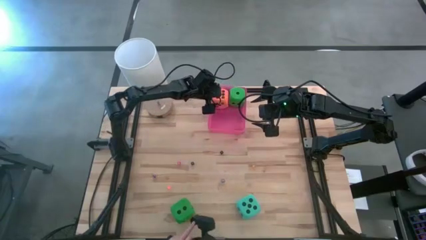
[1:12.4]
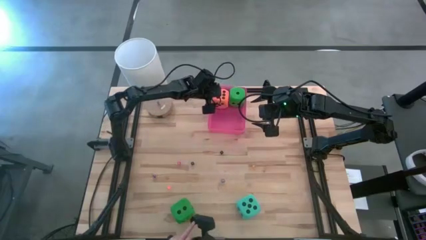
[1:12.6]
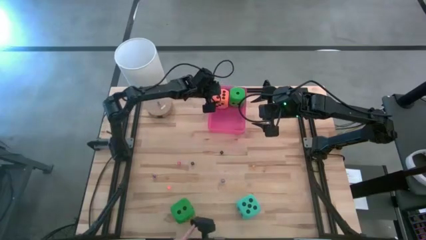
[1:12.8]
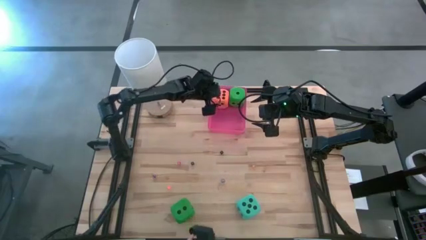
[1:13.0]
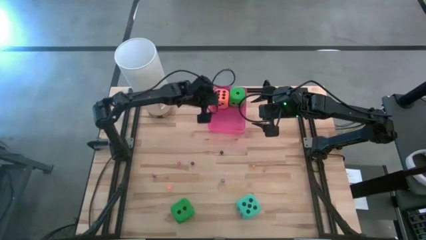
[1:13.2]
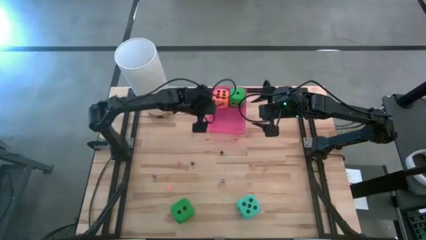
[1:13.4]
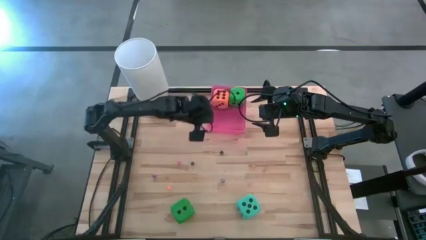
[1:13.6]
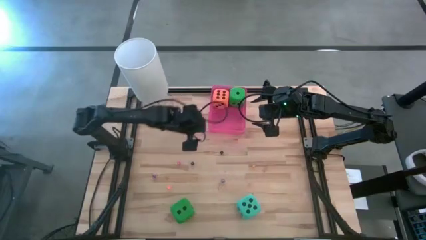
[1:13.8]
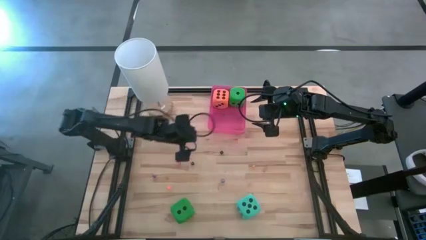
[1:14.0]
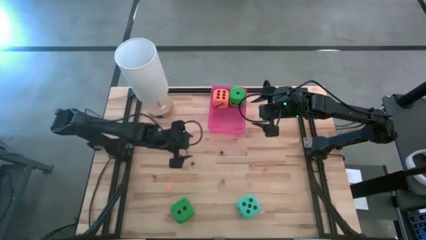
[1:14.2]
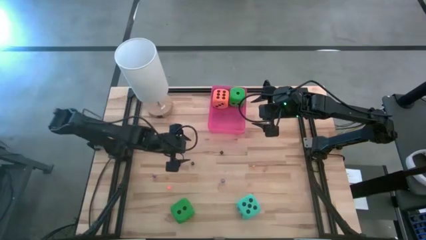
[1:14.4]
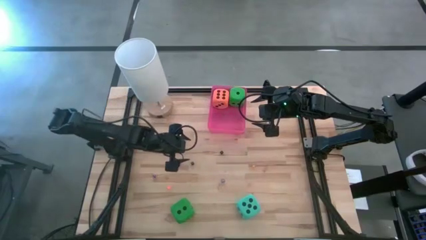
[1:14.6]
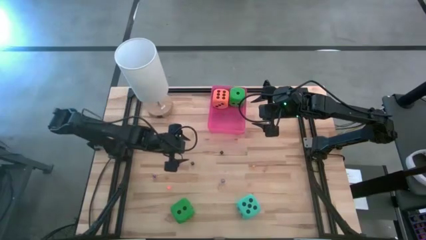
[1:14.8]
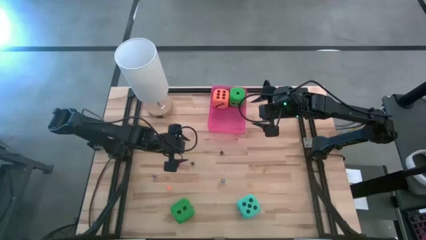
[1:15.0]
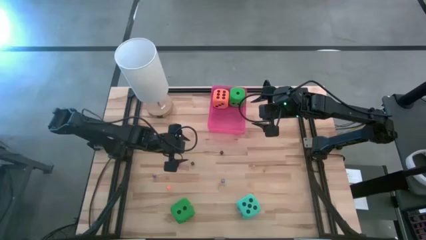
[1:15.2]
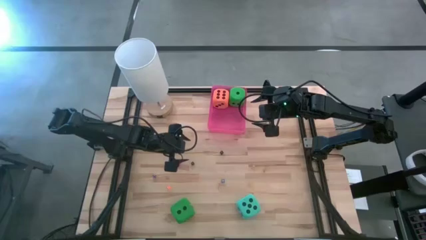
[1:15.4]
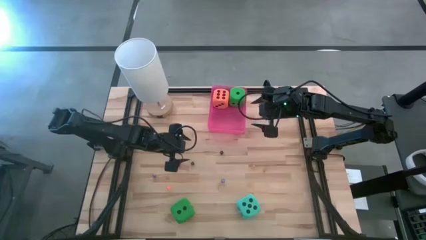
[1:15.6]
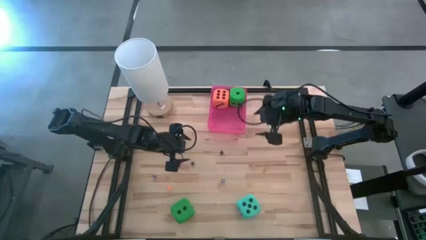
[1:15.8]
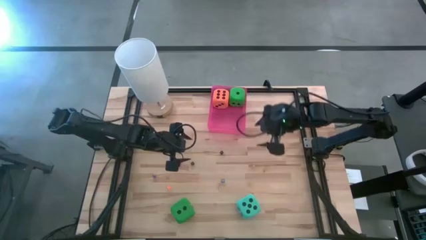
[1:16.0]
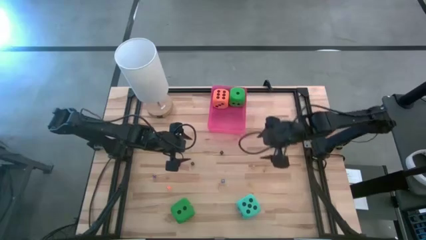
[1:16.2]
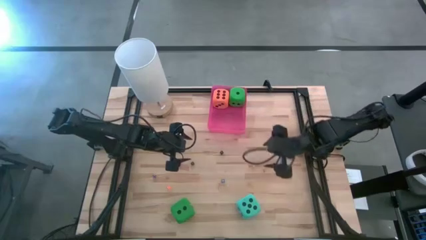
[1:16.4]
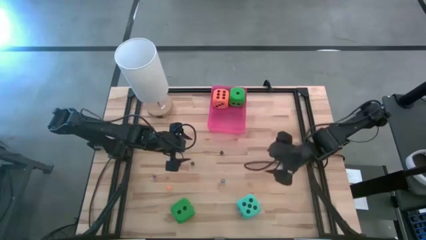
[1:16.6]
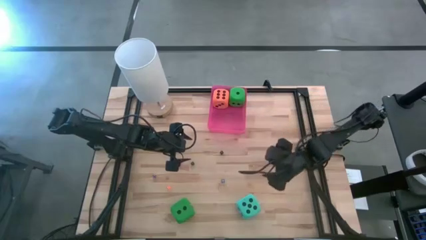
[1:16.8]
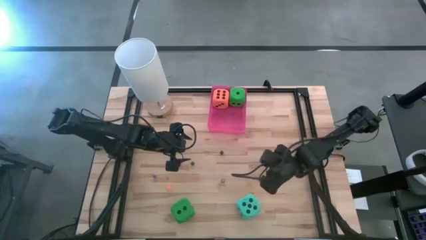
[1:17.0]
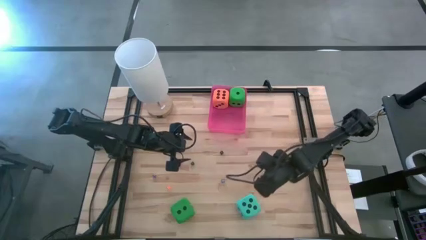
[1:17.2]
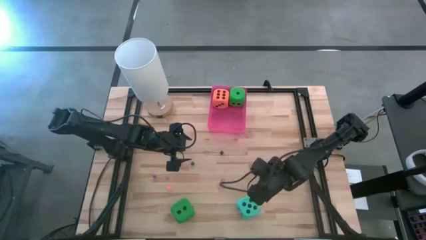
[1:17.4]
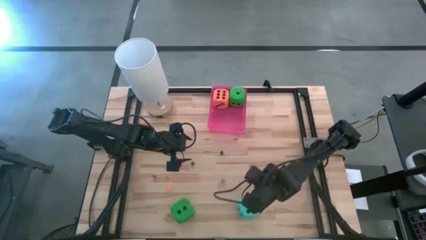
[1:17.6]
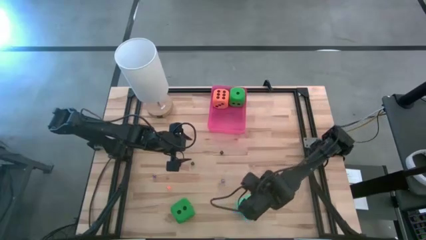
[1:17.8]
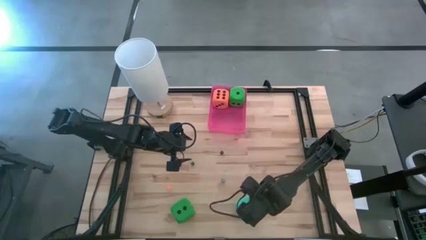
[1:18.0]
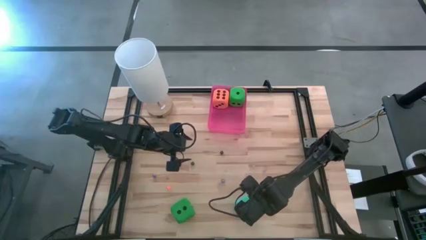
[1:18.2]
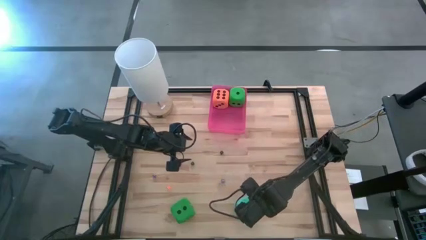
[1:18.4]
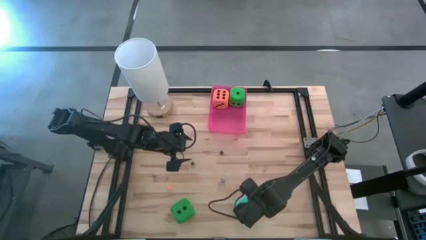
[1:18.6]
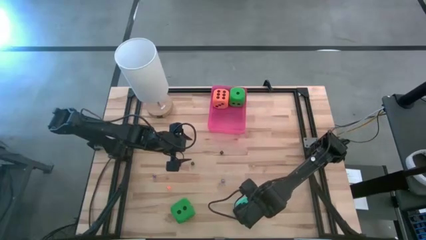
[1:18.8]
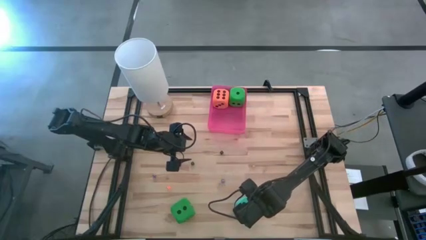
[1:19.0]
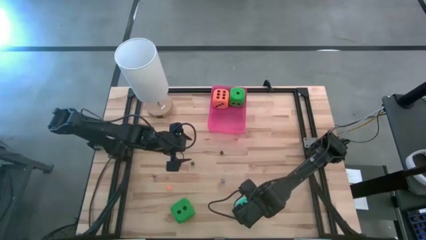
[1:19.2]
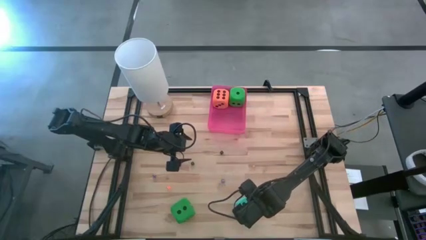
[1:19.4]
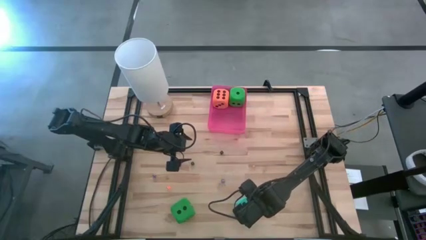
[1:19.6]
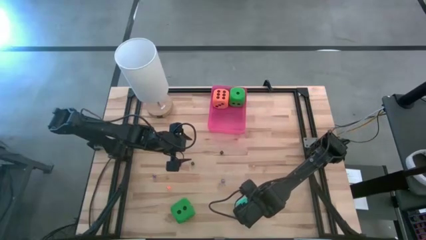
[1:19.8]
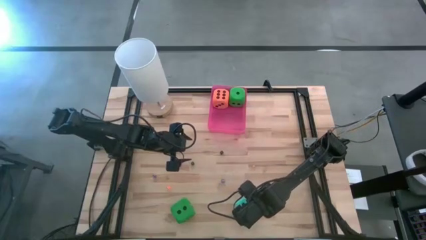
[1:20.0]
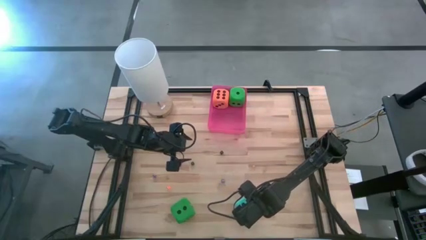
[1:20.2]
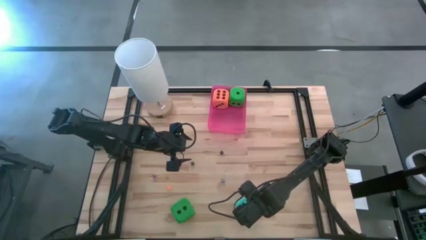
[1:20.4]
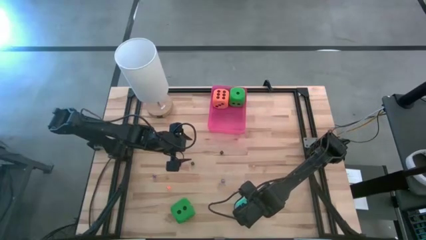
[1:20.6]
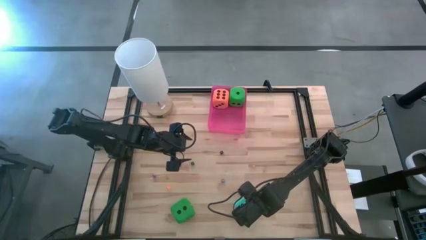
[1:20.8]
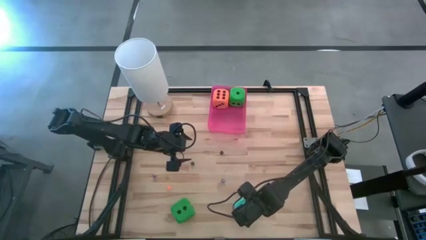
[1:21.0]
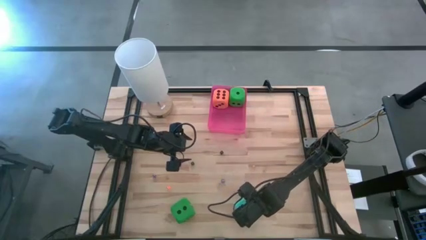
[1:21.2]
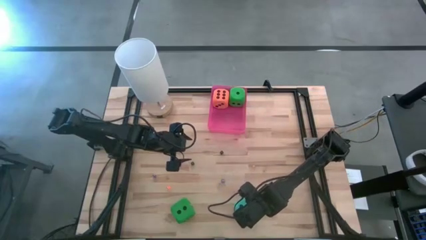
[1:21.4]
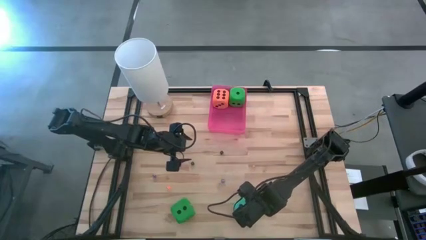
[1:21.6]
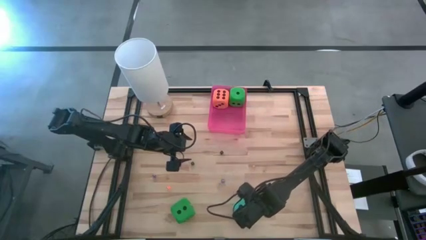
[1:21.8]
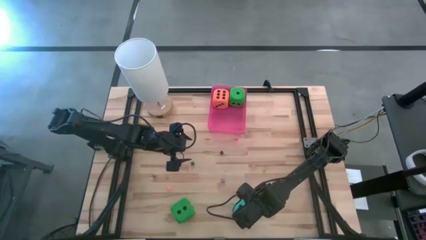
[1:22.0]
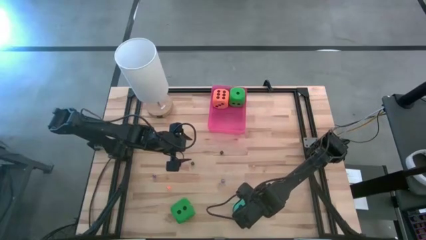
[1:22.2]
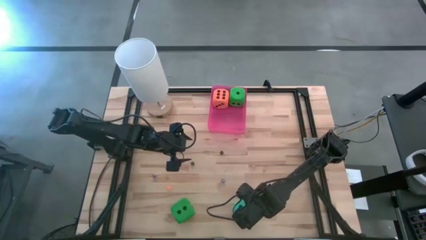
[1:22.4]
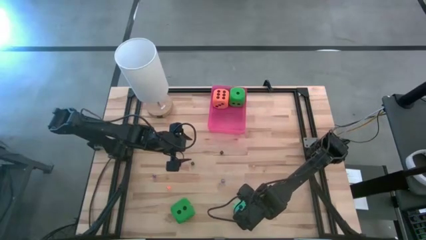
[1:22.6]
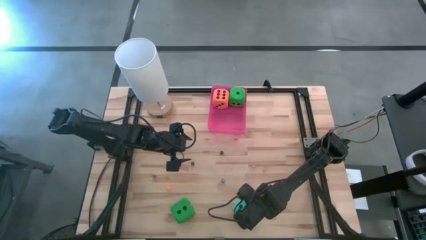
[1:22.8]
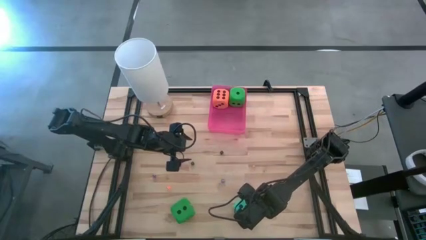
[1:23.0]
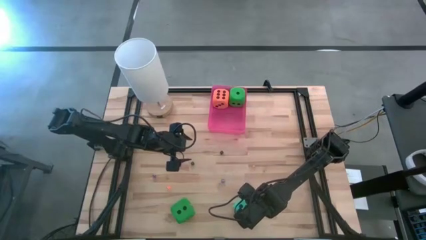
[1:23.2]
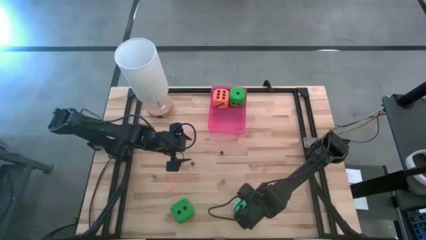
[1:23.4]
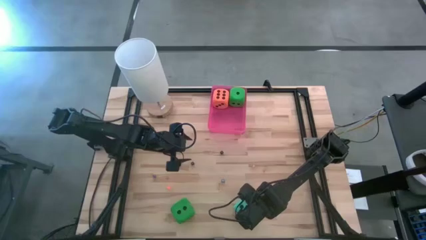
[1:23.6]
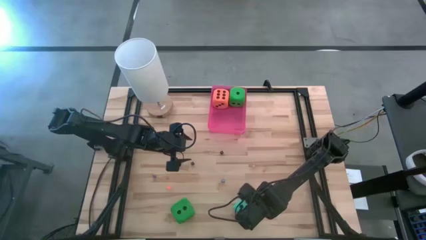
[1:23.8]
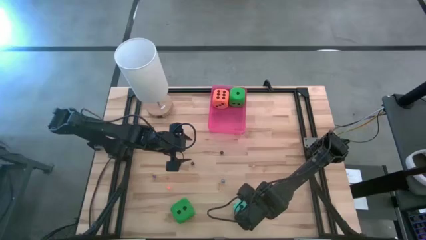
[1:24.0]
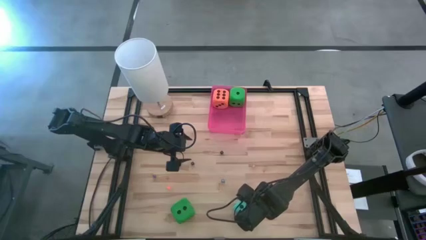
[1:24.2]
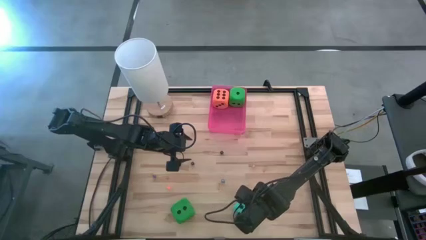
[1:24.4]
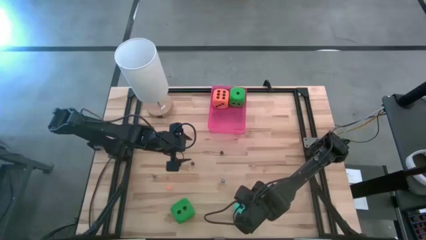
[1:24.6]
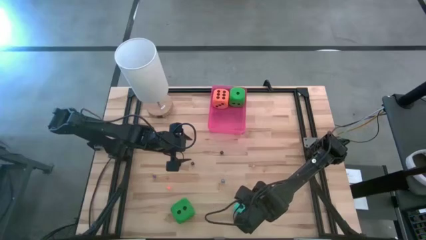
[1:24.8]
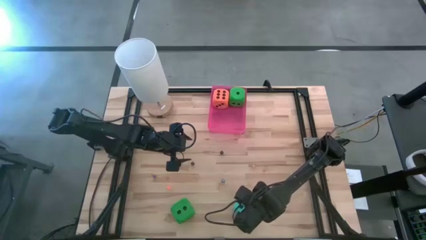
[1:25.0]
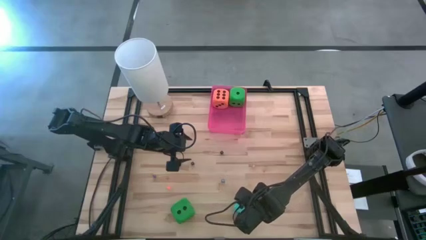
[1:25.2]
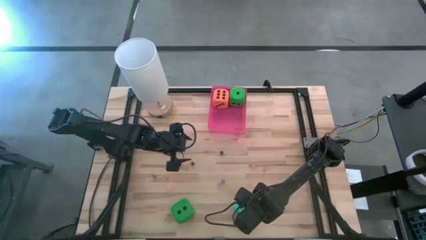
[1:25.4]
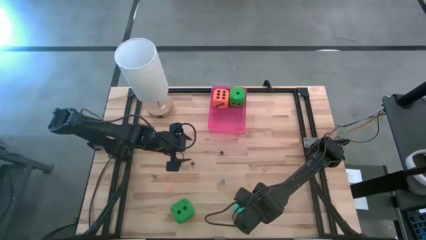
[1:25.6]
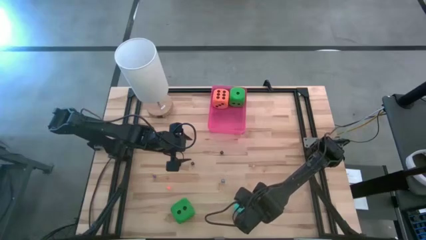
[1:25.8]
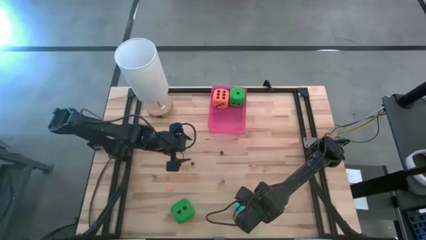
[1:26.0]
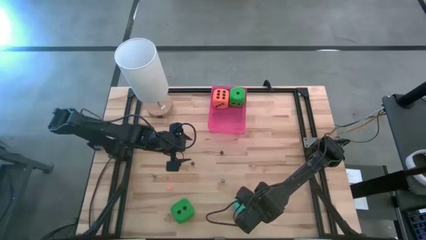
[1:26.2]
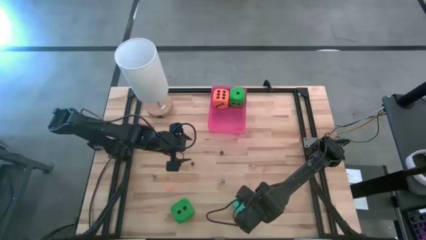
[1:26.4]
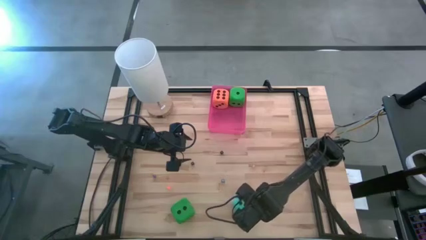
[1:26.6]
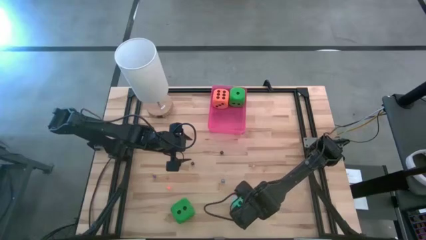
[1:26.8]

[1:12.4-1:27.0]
Task: Pick & Place Dice
Put the big blue dice into the red container
